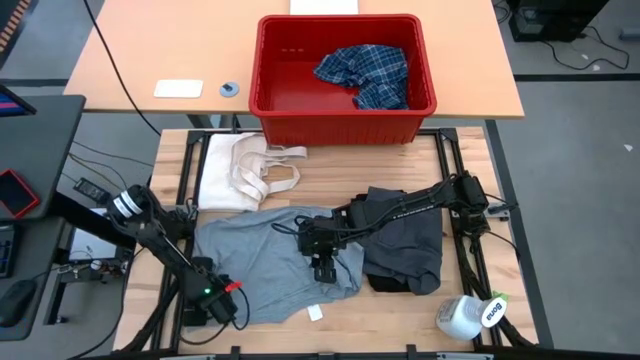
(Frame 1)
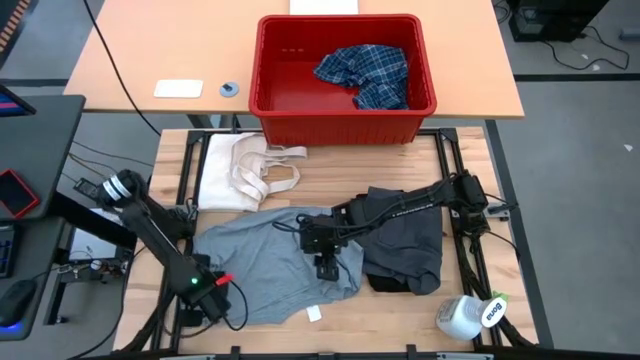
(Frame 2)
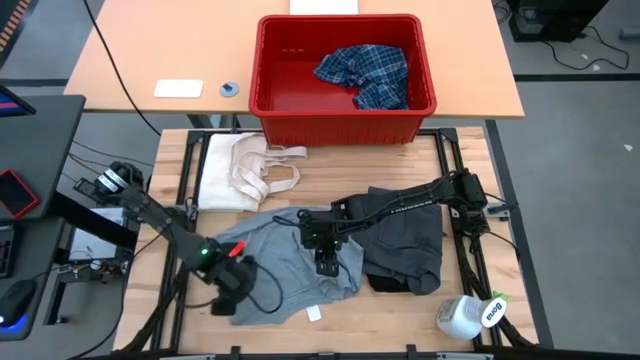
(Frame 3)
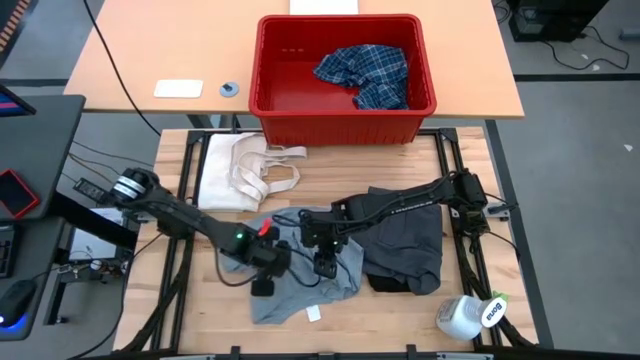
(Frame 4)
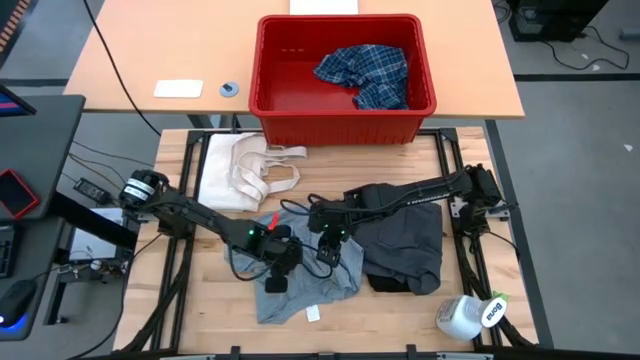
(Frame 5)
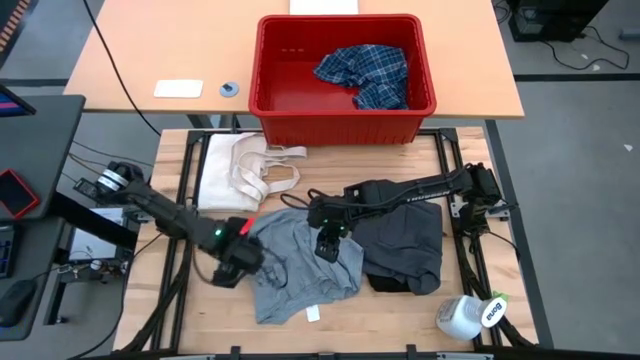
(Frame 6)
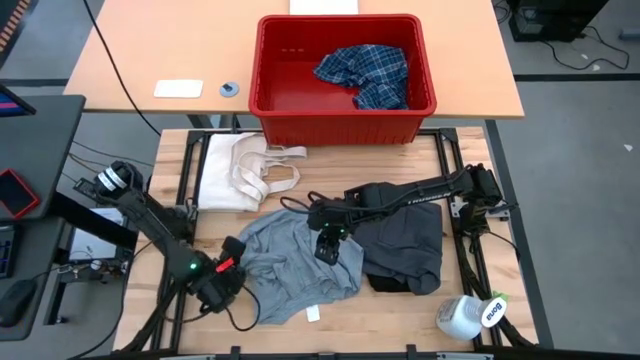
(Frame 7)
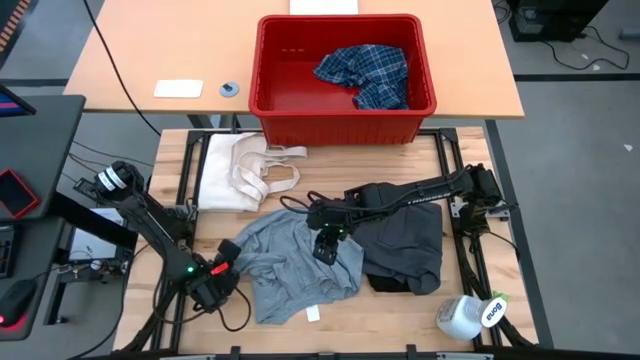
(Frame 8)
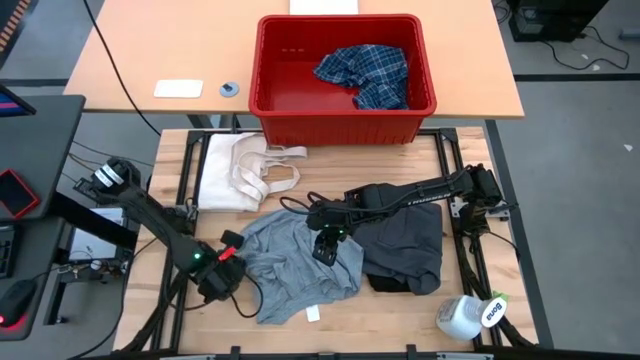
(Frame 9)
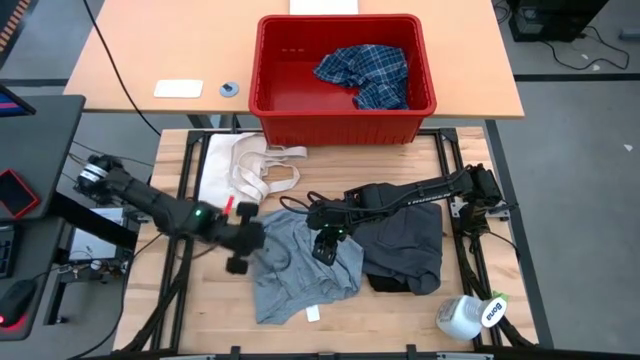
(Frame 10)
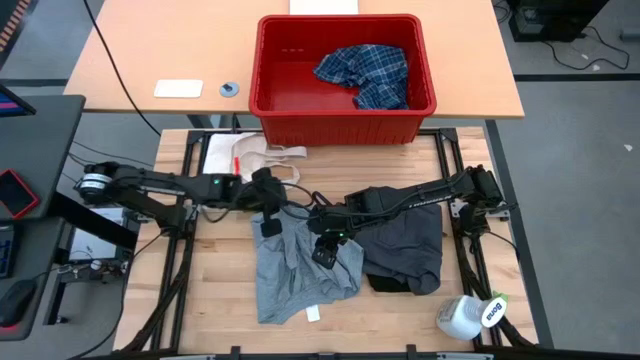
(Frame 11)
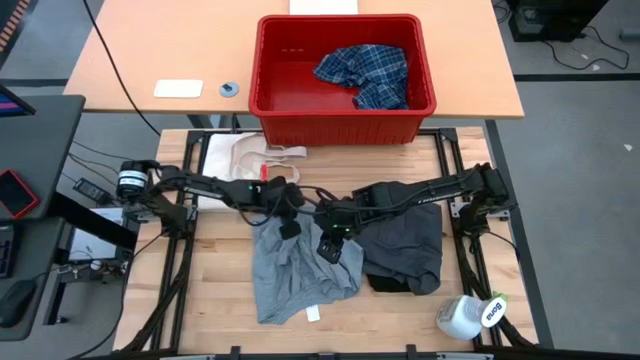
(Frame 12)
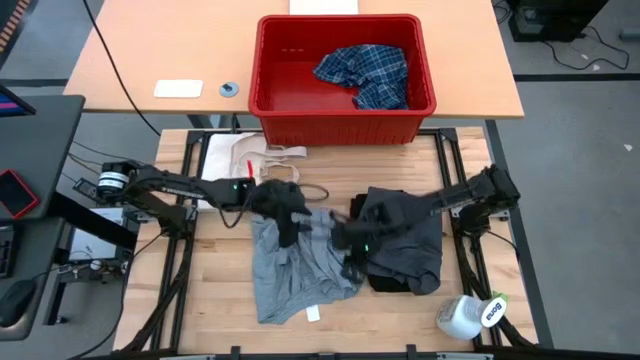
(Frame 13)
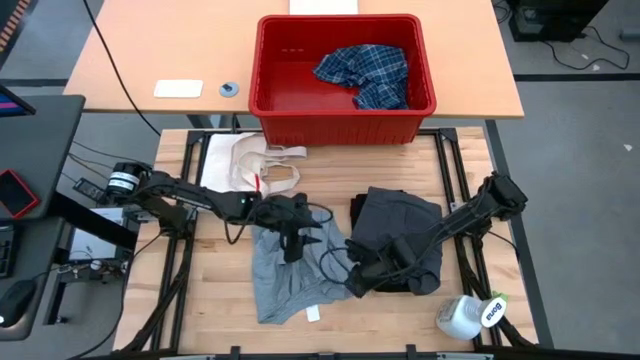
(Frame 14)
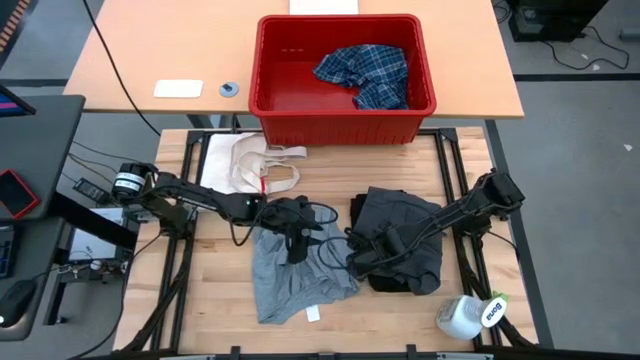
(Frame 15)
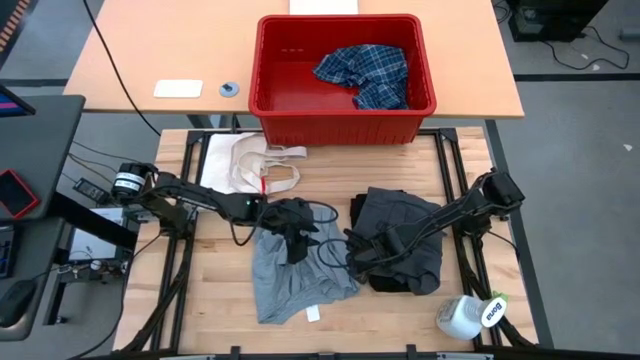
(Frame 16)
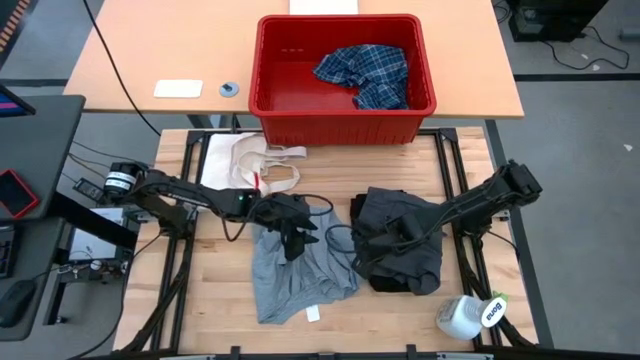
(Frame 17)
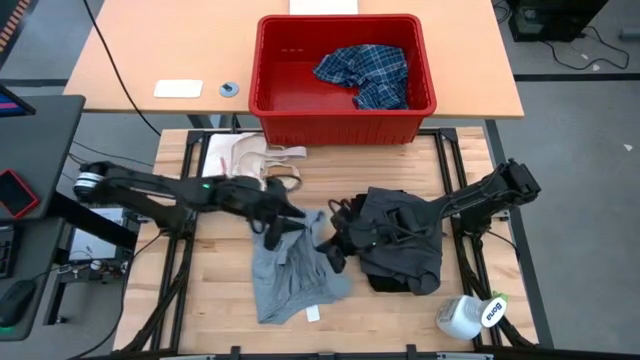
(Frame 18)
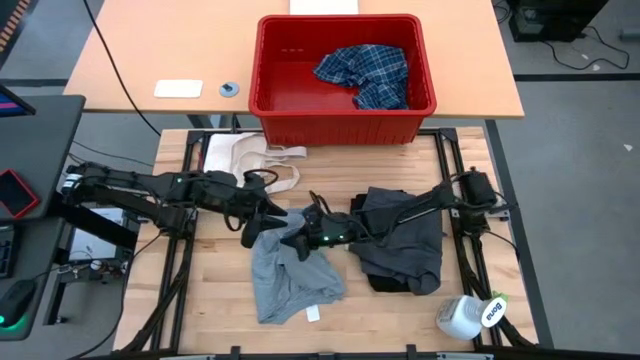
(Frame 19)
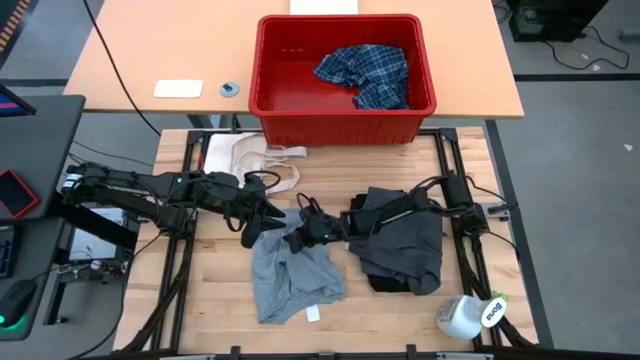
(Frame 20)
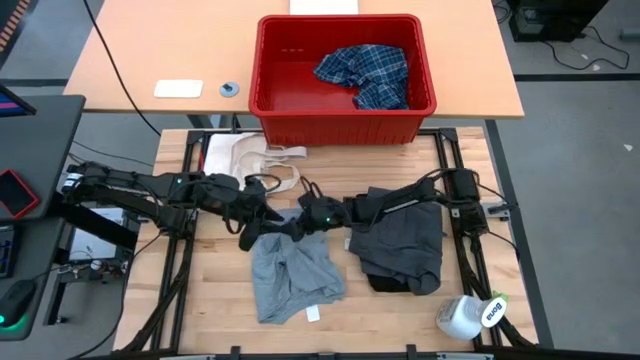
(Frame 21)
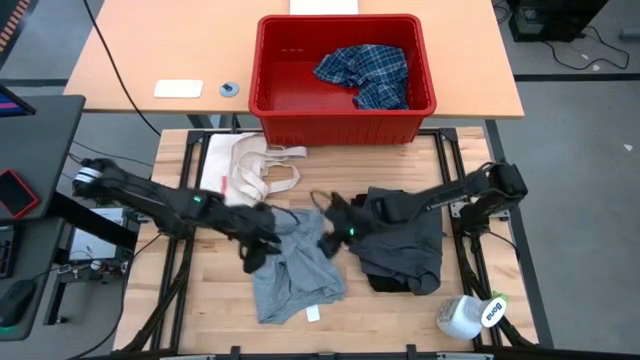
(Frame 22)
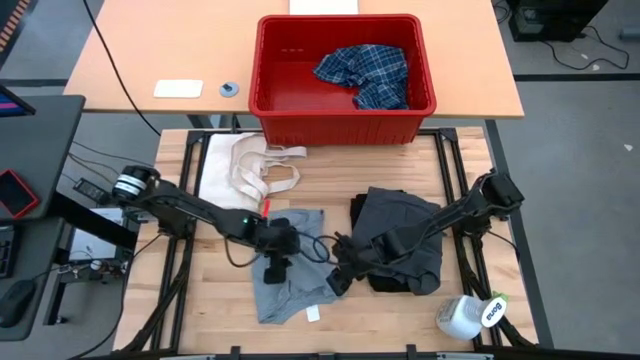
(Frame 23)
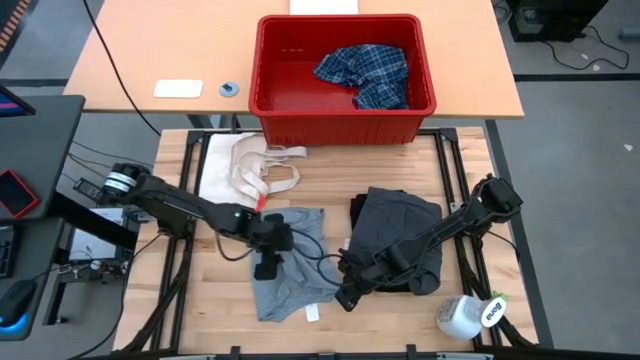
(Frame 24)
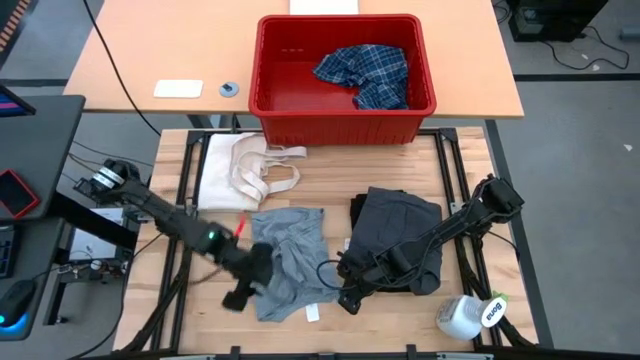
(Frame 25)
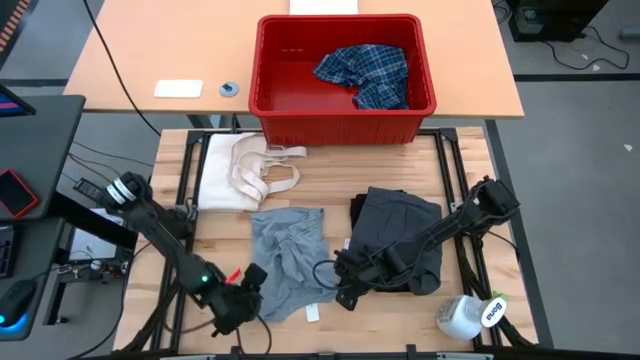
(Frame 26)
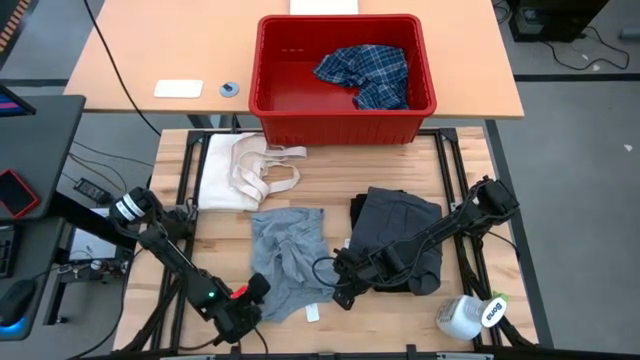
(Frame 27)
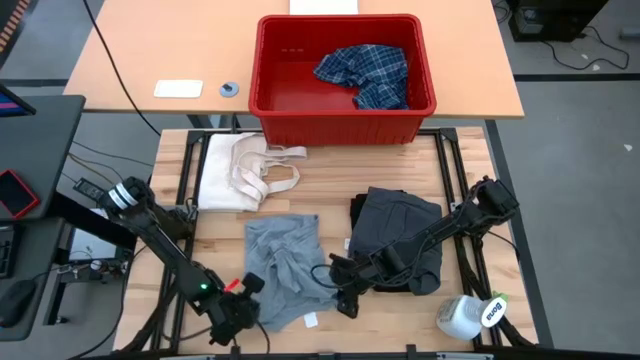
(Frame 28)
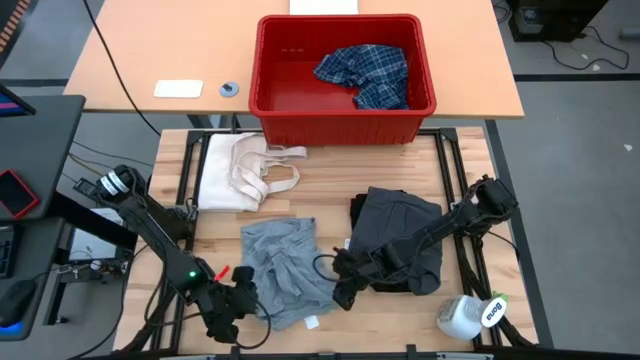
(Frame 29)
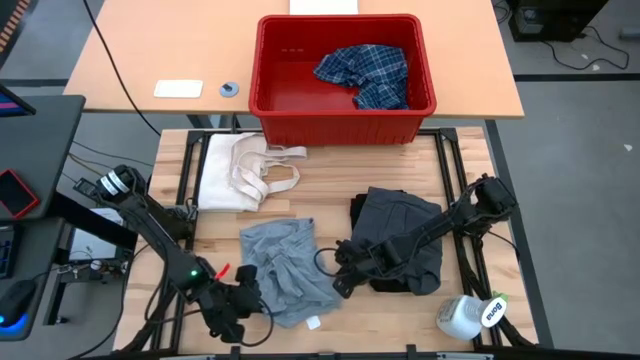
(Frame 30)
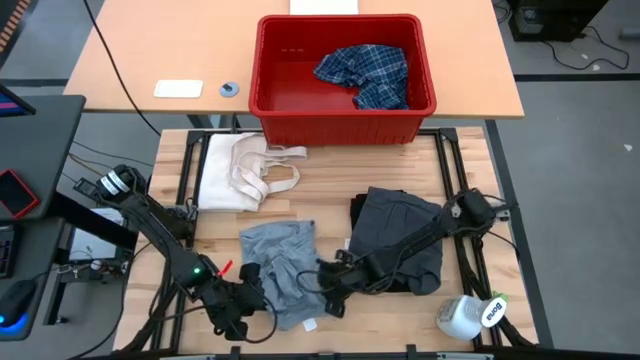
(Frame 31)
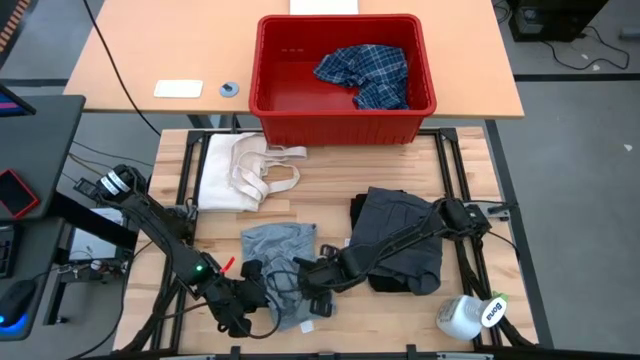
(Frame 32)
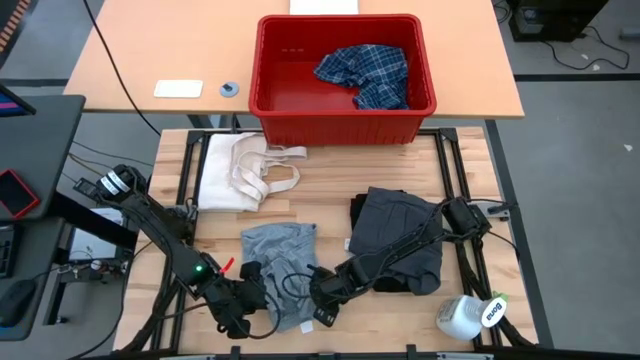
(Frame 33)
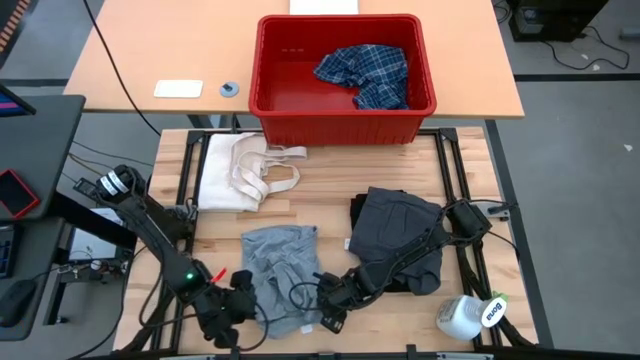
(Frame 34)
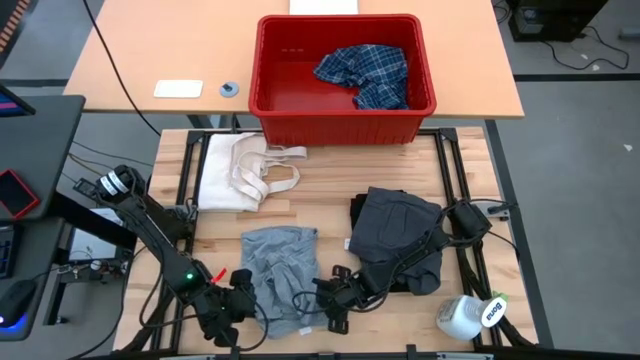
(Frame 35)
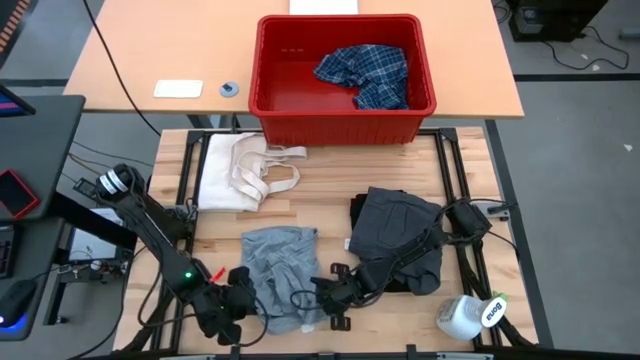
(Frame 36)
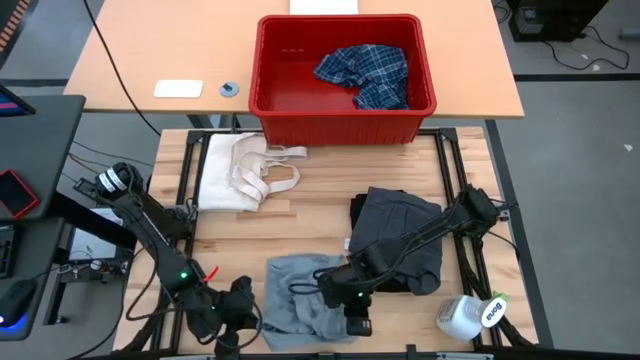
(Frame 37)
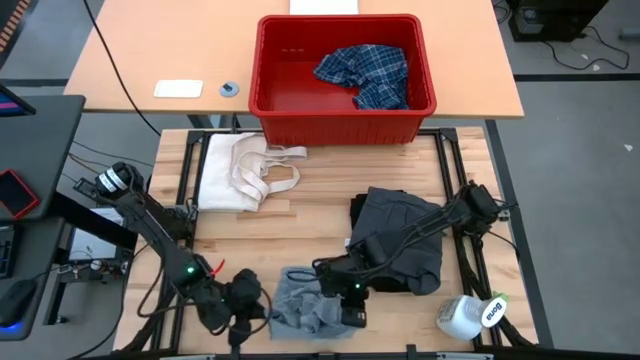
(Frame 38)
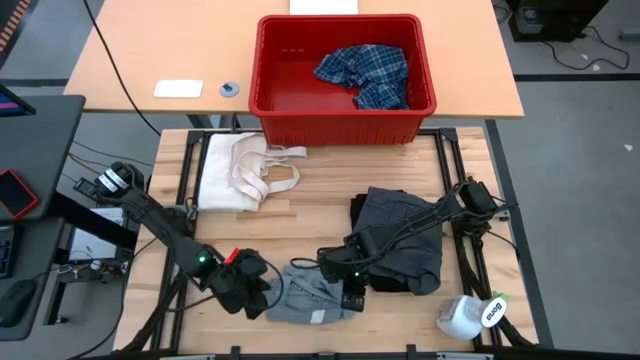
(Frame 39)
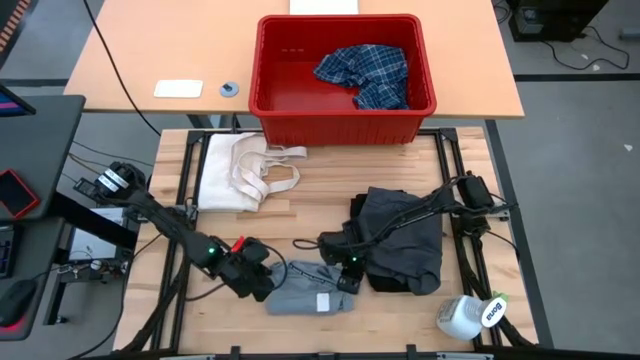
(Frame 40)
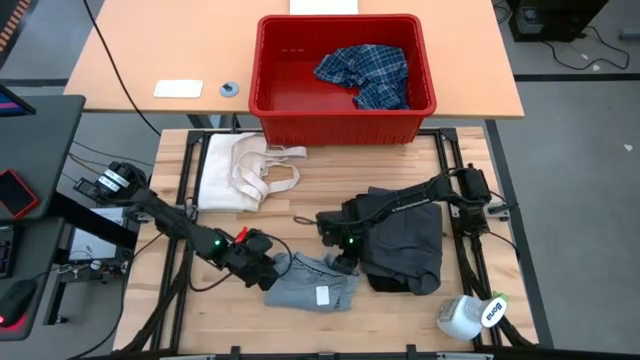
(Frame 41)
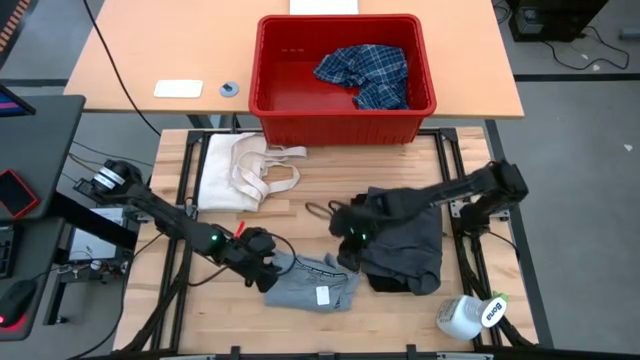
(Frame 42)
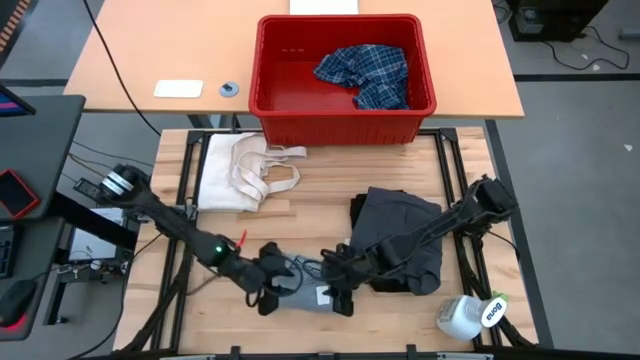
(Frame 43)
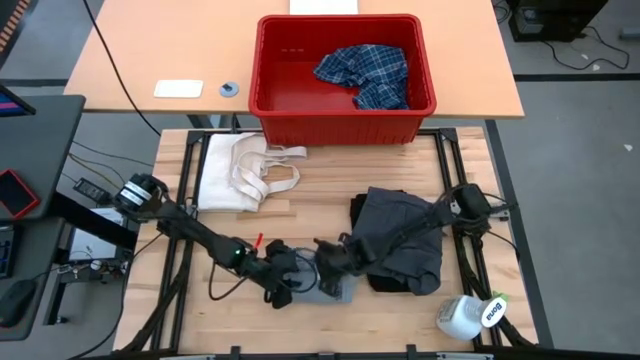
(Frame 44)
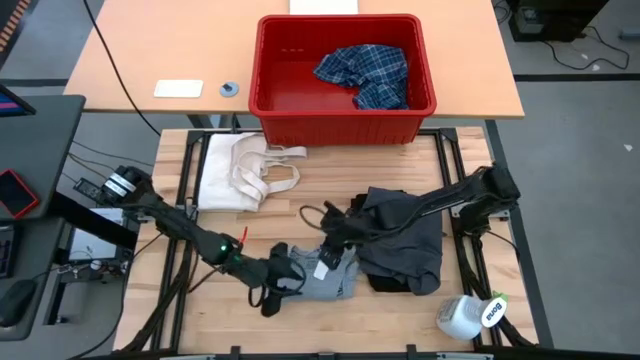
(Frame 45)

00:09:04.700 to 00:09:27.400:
Task: Fold Laundry from Bin
Fold the gray shirt
